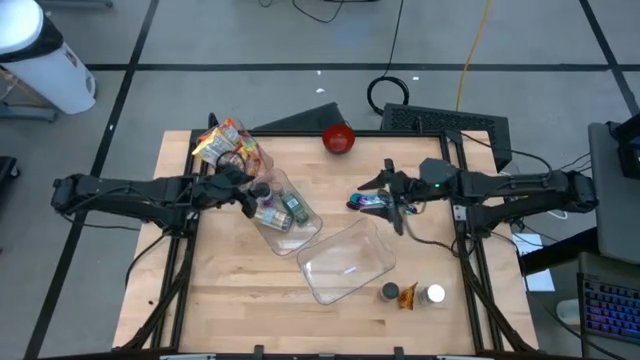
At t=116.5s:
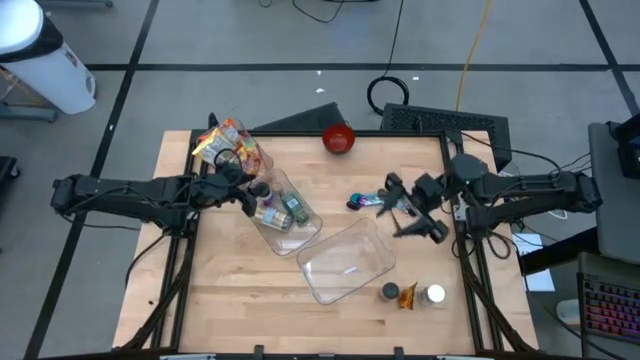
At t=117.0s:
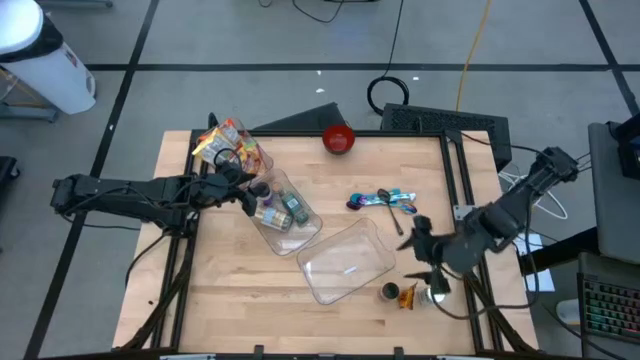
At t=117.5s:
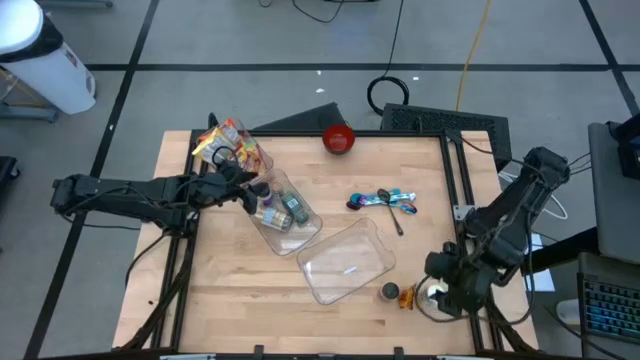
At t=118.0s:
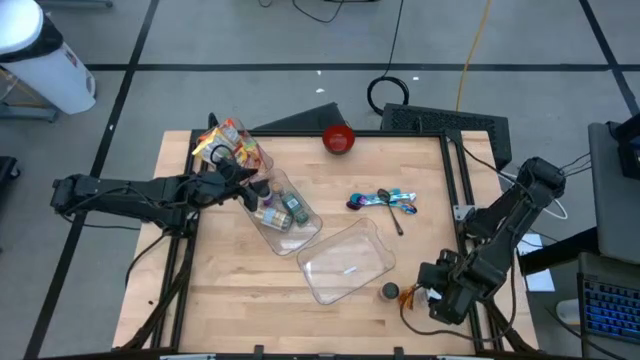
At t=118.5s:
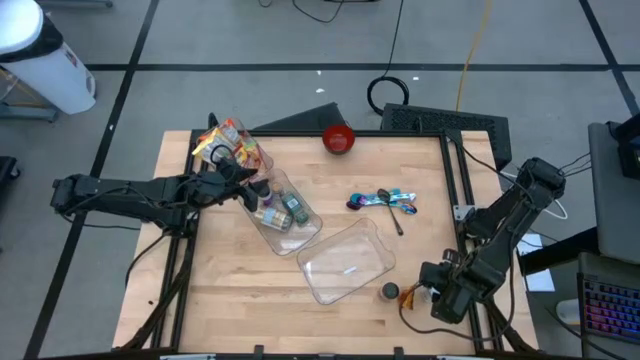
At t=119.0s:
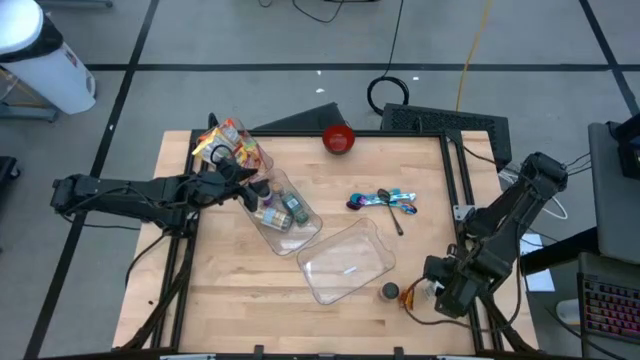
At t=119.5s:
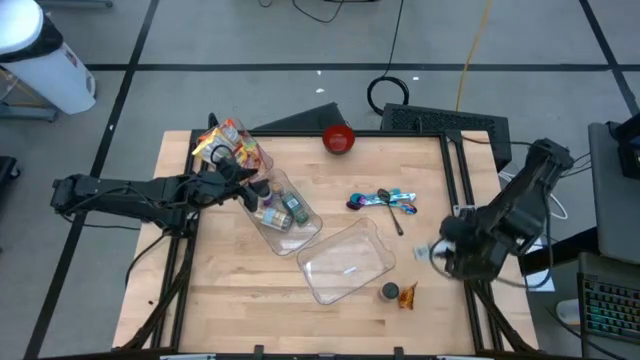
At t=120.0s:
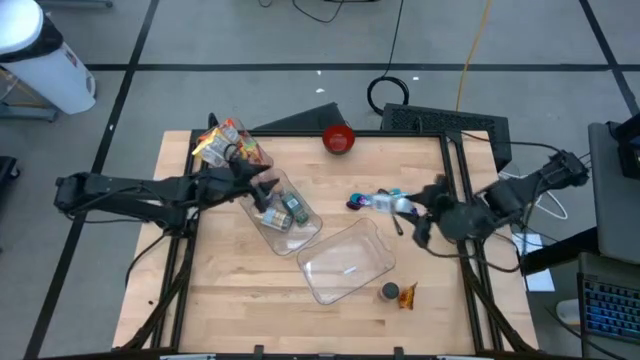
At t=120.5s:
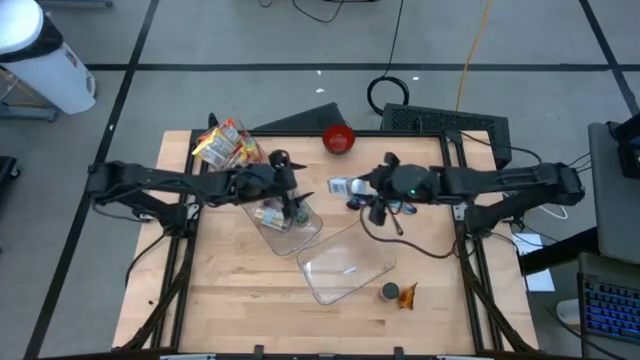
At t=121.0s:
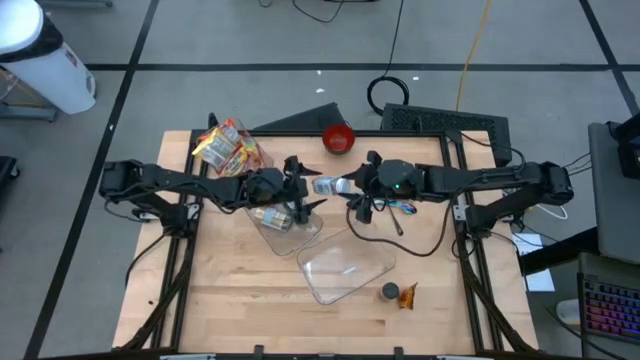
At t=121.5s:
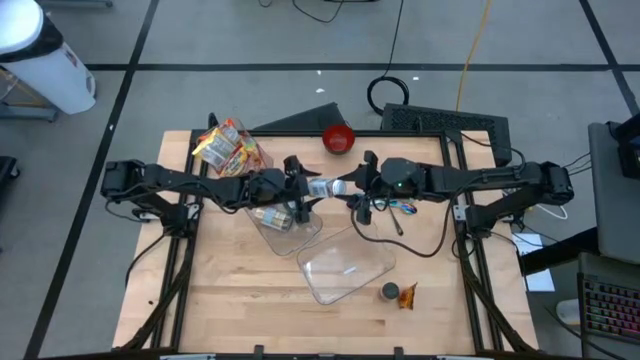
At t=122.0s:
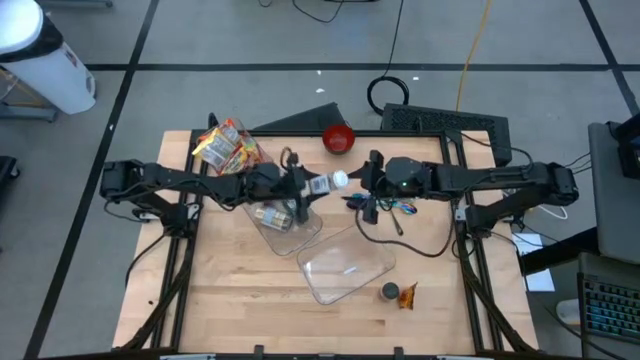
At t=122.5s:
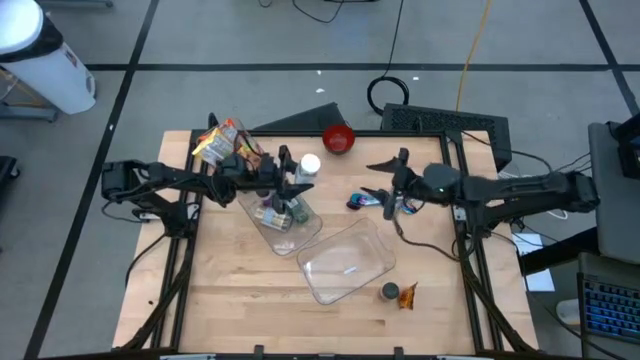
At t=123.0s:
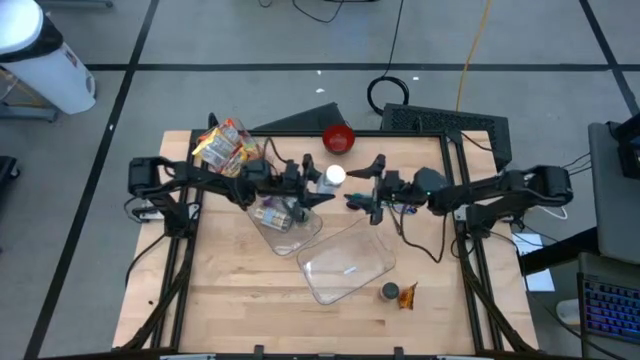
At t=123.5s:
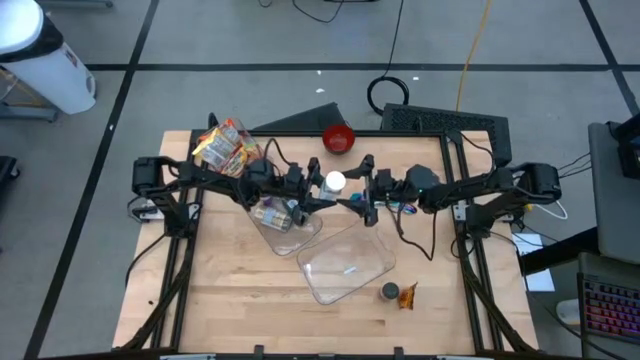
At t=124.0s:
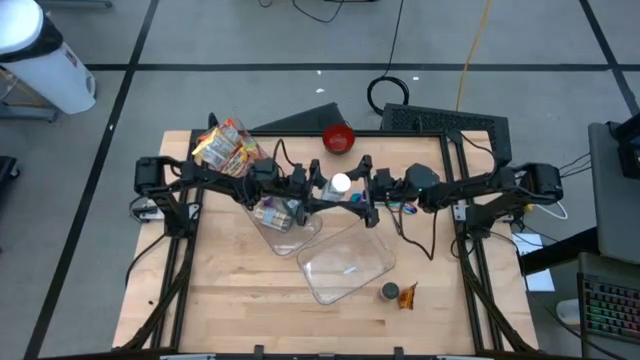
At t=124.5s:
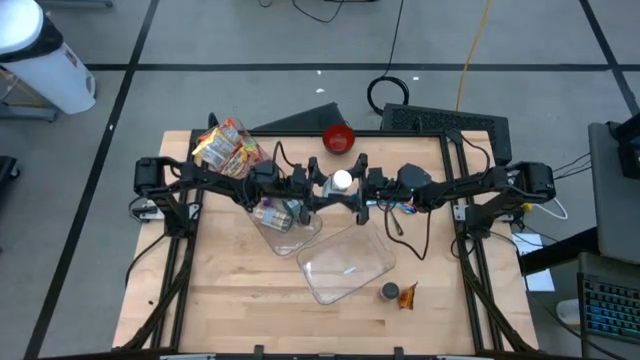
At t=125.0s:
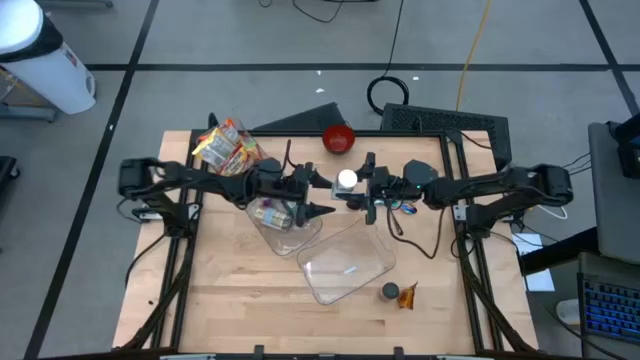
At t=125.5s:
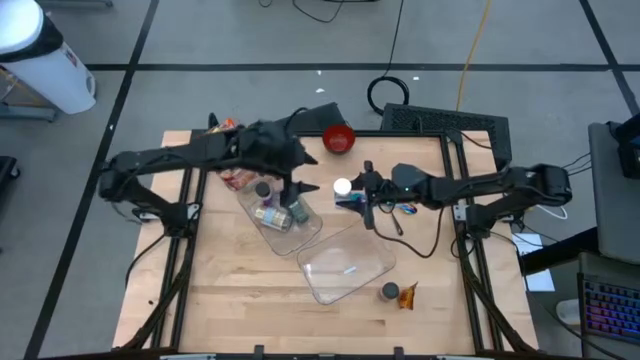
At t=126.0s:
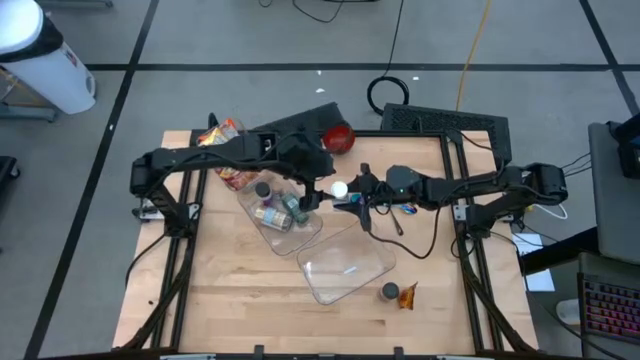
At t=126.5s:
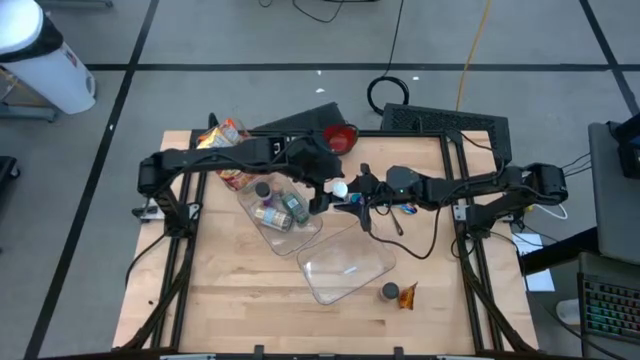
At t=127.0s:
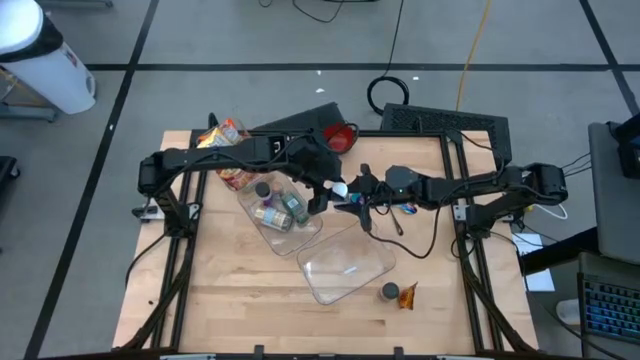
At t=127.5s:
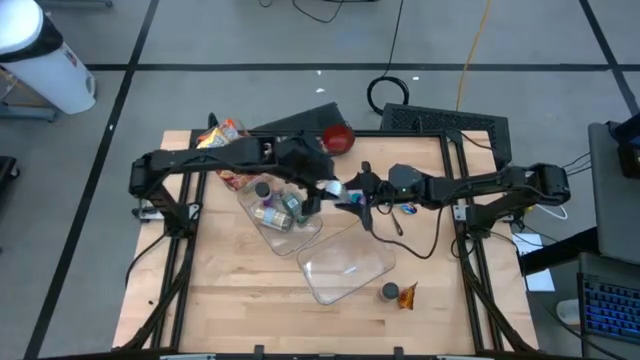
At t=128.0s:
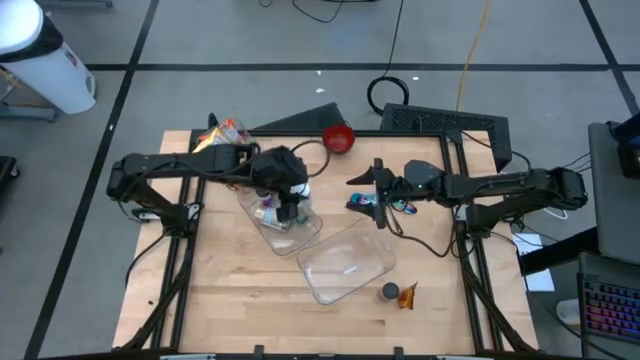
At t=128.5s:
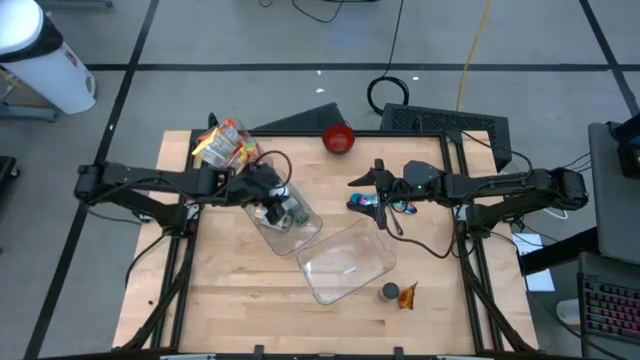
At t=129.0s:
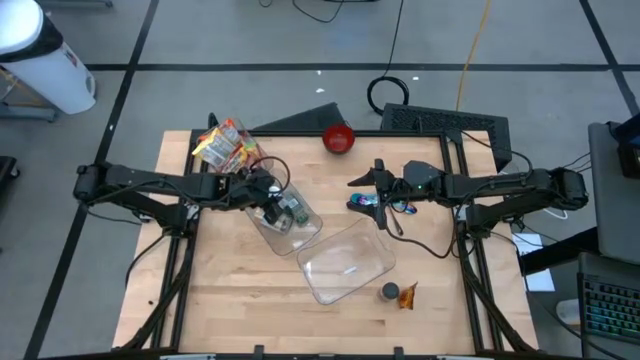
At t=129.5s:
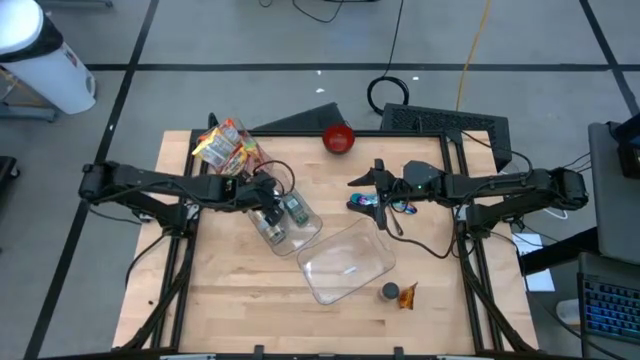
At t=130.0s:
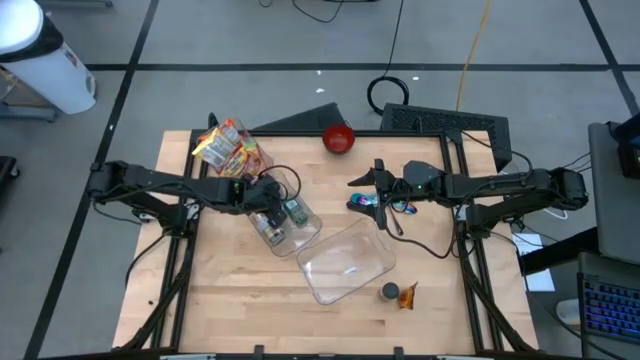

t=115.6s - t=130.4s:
Task: Pick & Place Food Item
Put the white seasoning bottle into the middle transparent bin

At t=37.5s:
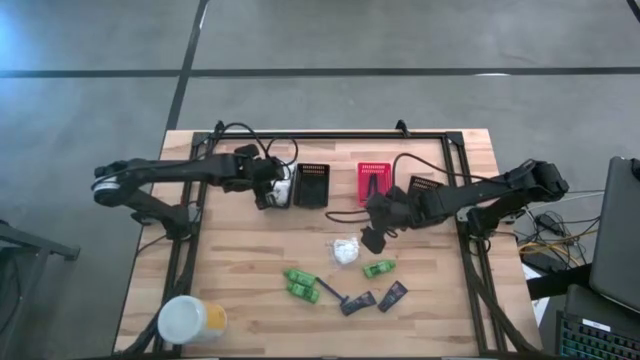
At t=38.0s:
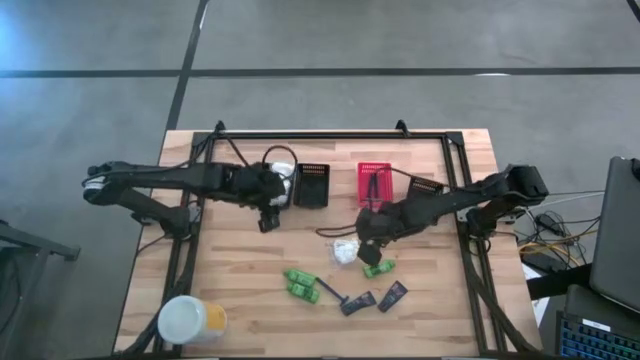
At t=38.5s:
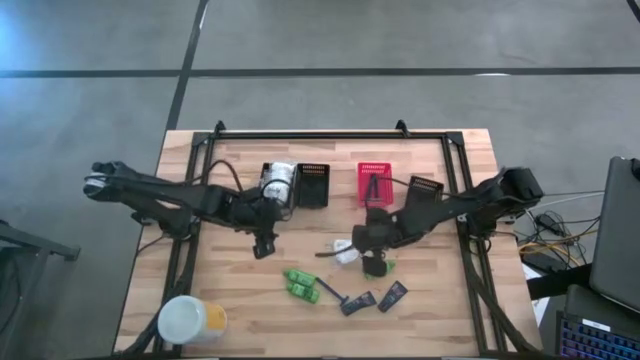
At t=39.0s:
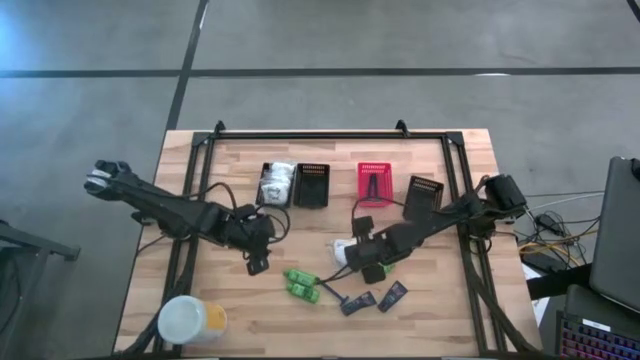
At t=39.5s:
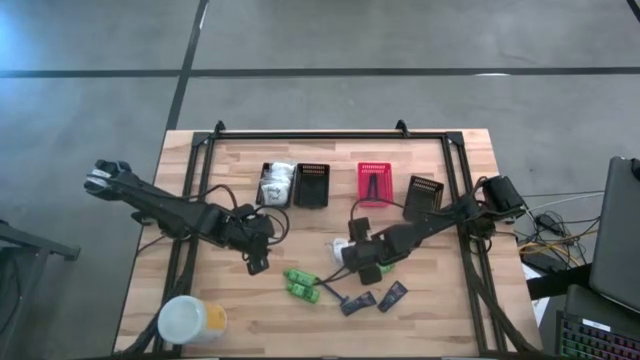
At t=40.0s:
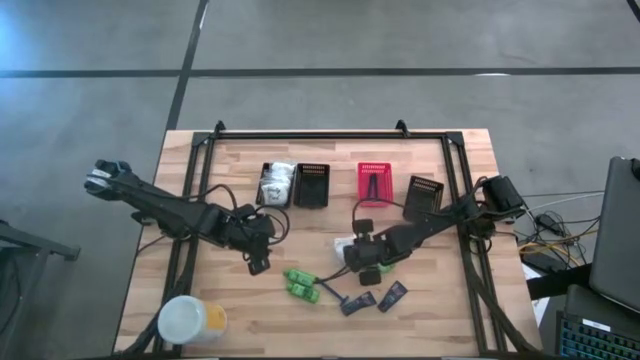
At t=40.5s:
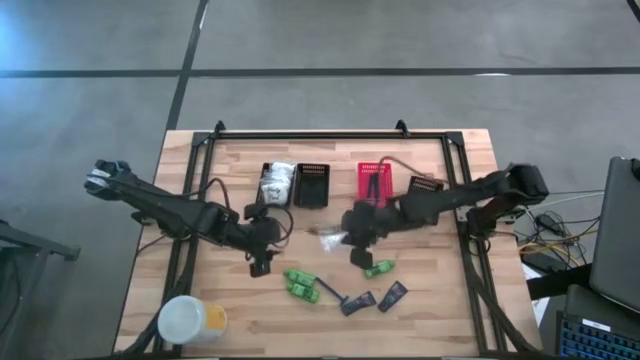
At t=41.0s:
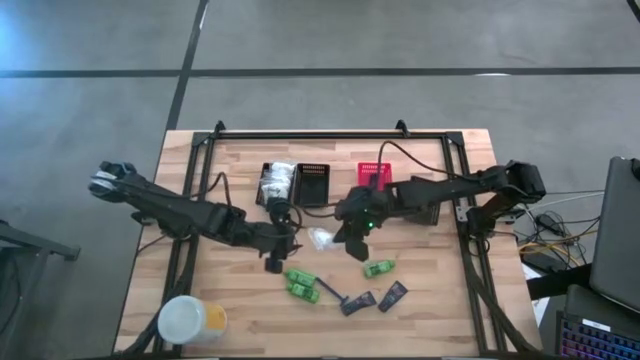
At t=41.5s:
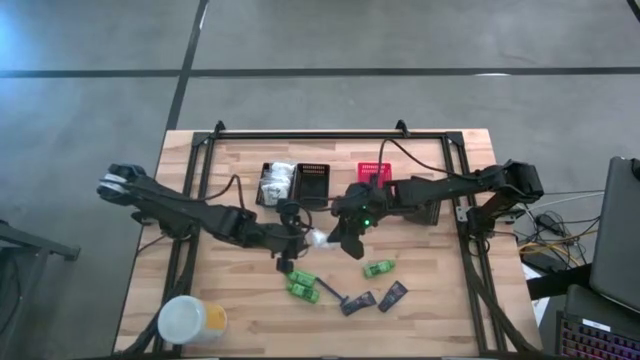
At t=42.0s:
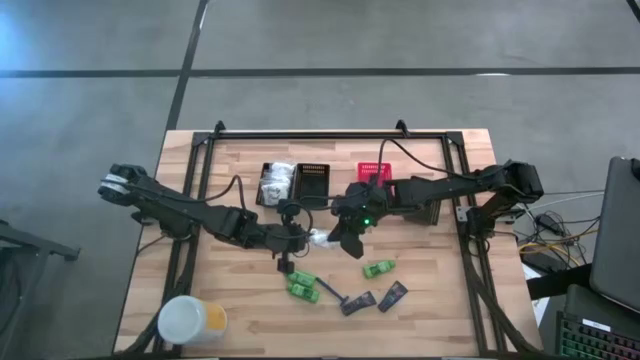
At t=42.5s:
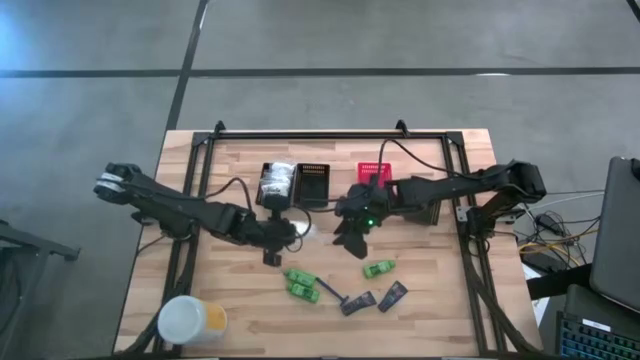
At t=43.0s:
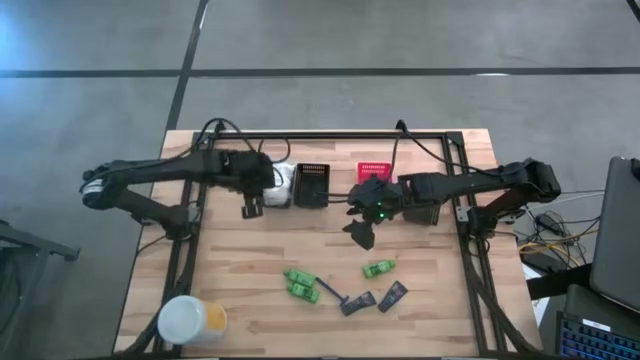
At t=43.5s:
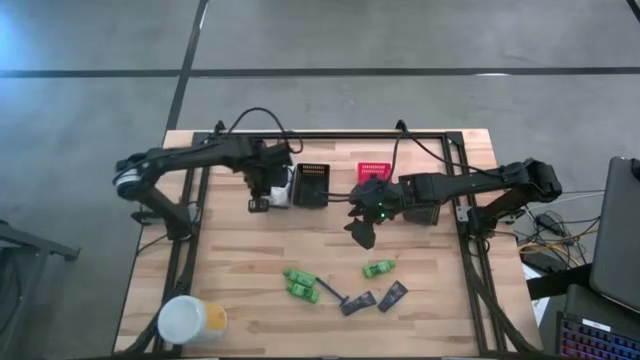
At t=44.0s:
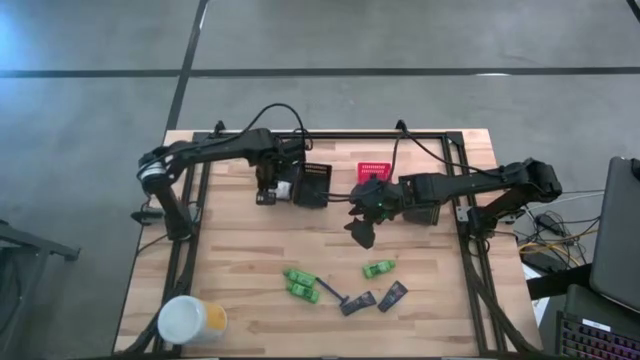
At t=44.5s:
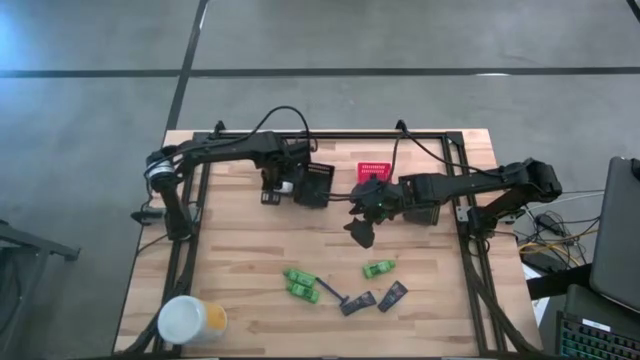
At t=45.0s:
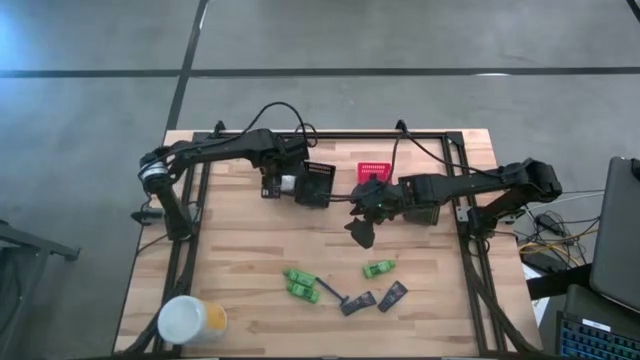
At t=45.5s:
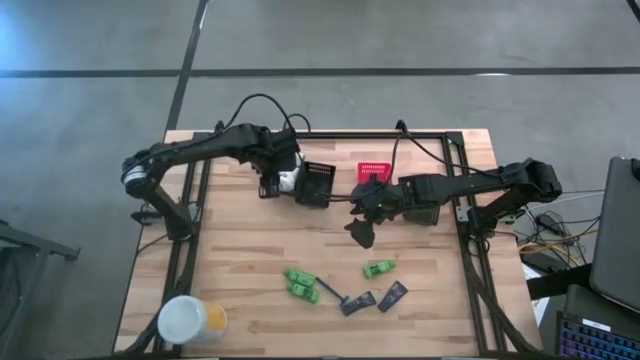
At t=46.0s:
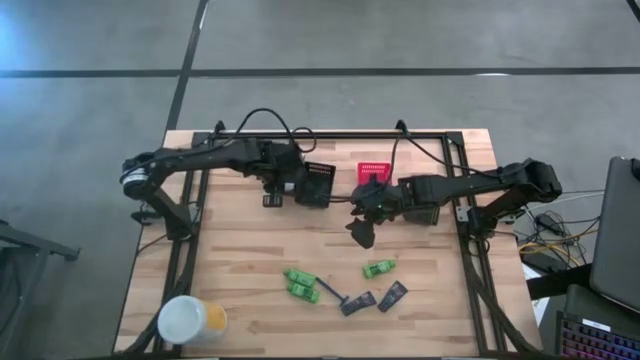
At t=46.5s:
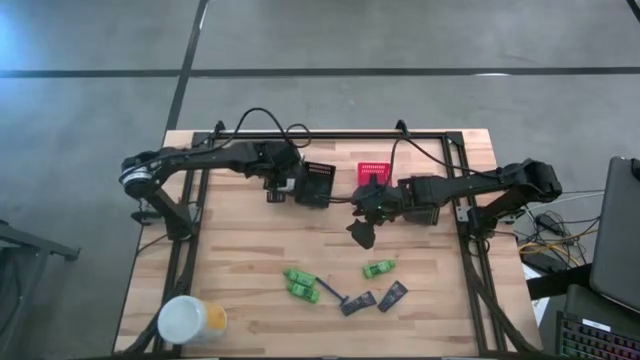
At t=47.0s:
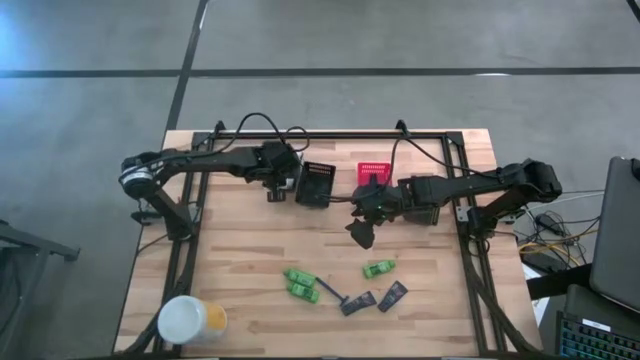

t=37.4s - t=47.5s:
Task: Pick & Place Travel size toiletries
Put the white cotton pack into the left black bin
